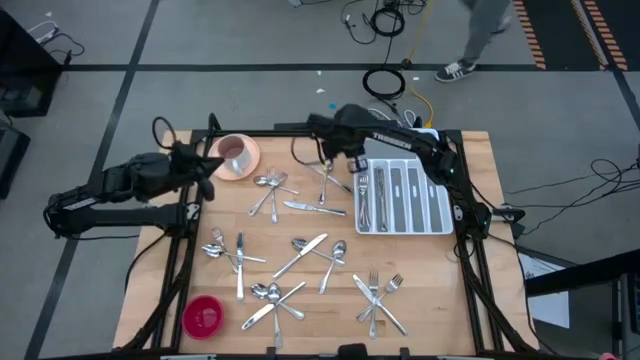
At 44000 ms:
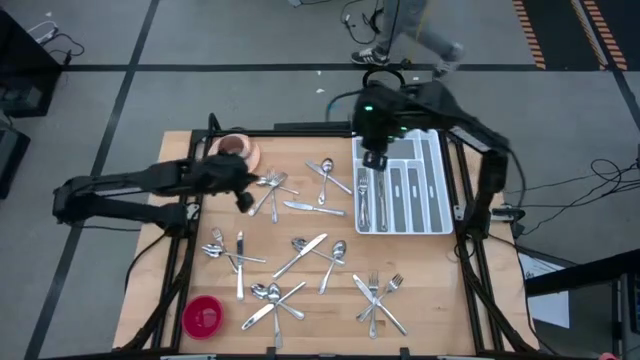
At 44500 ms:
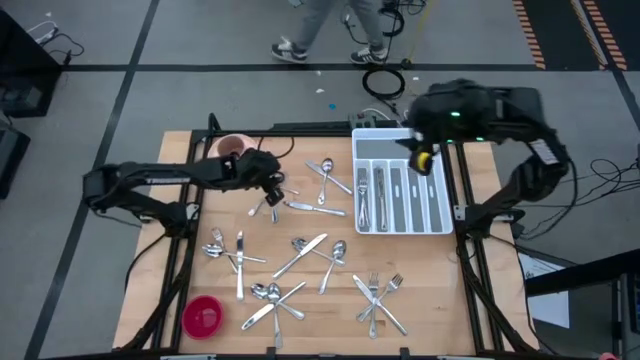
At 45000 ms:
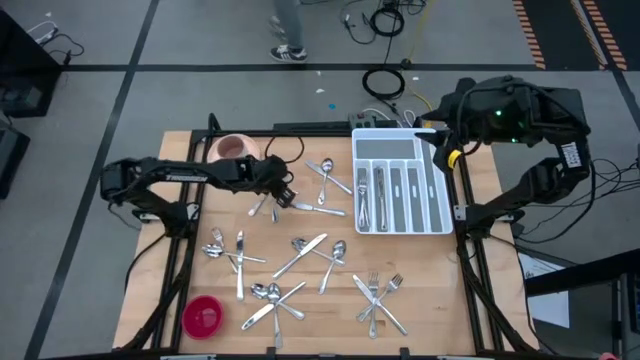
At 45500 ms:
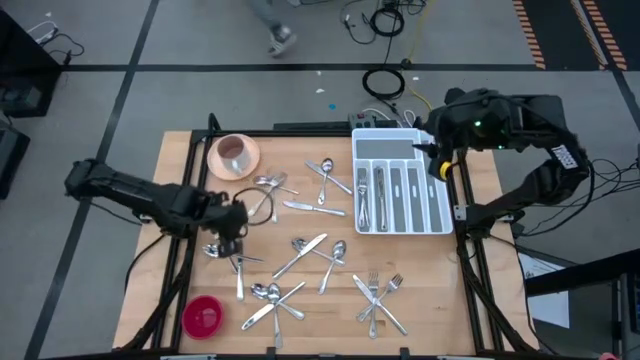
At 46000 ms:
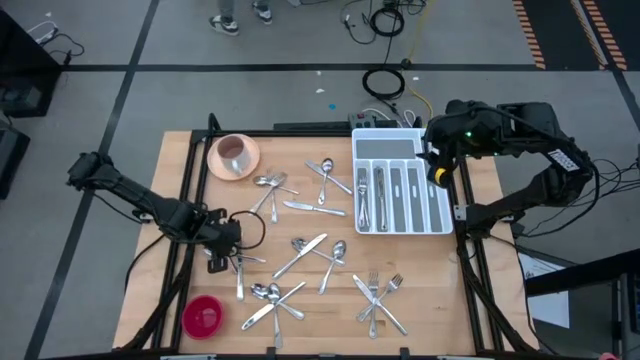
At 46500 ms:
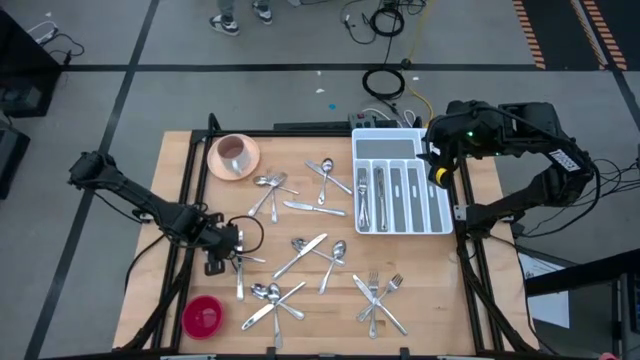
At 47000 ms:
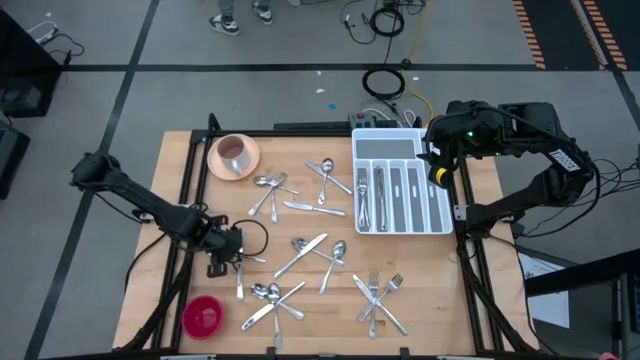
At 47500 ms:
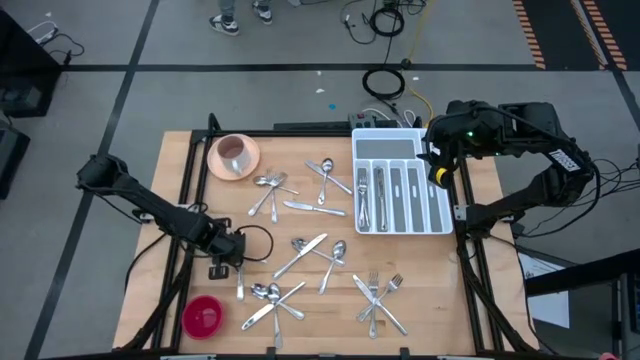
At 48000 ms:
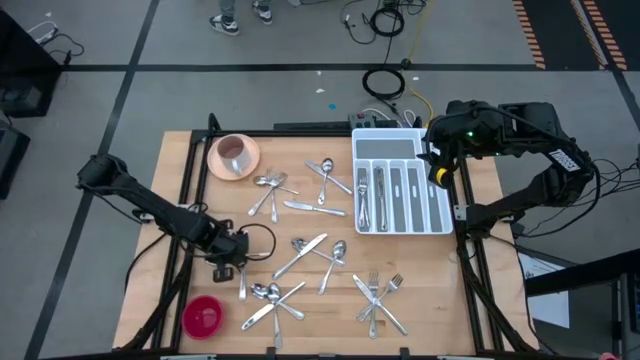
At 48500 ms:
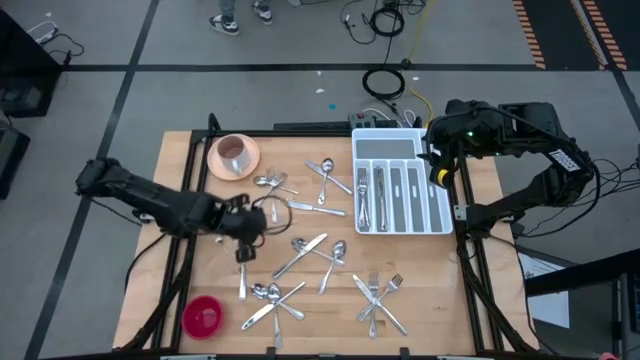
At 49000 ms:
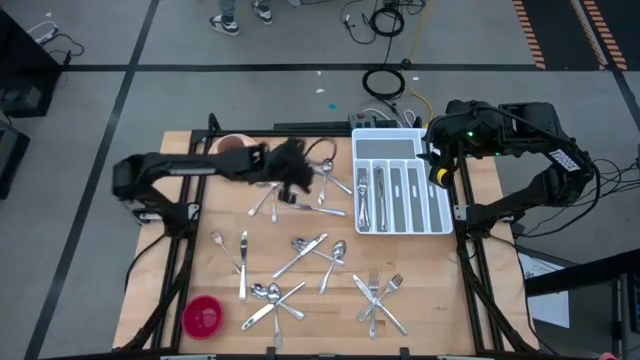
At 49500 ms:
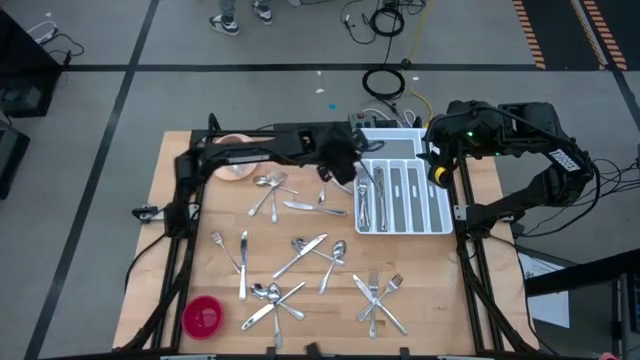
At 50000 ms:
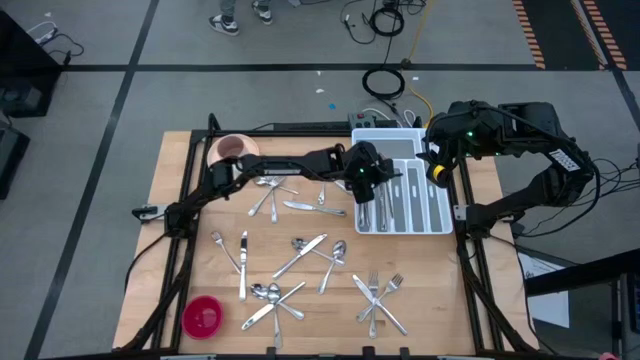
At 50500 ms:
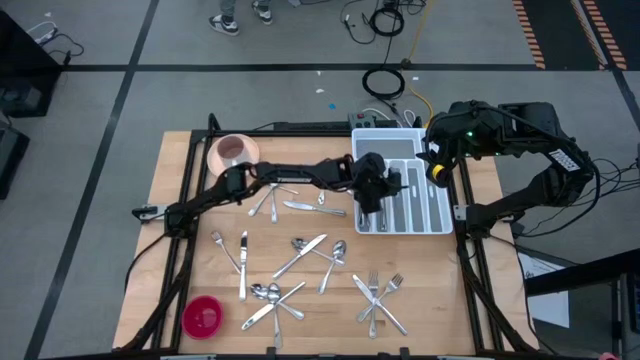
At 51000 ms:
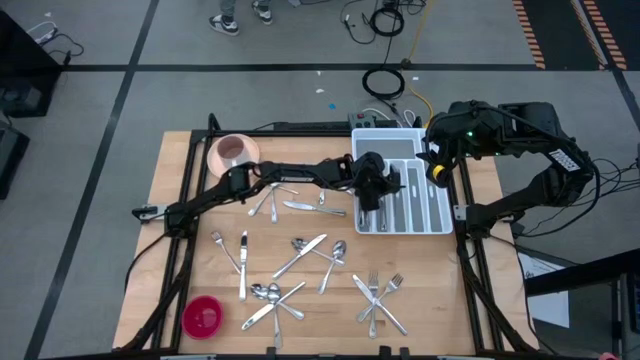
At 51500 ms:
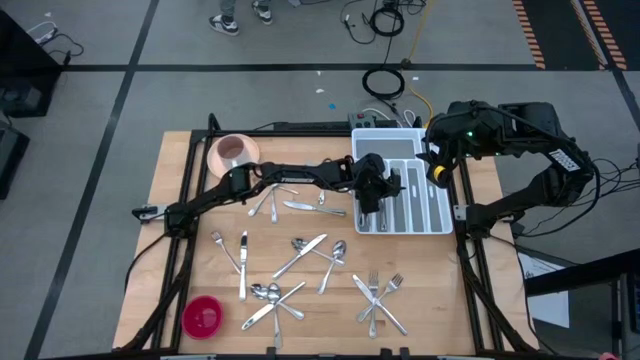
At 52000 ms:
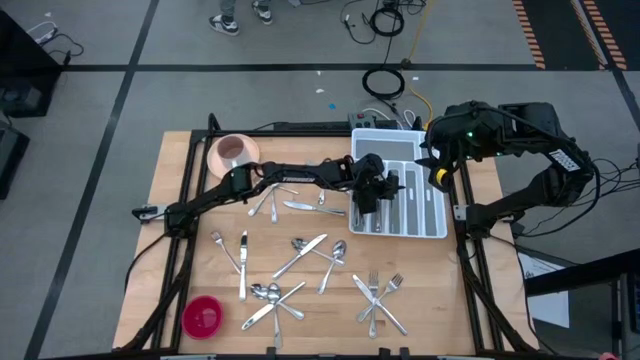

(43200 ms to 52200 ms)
Task: Sort silverware
Put the silver spoon into the white silverware tray

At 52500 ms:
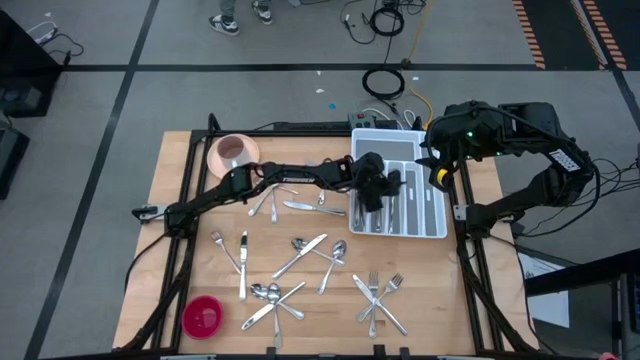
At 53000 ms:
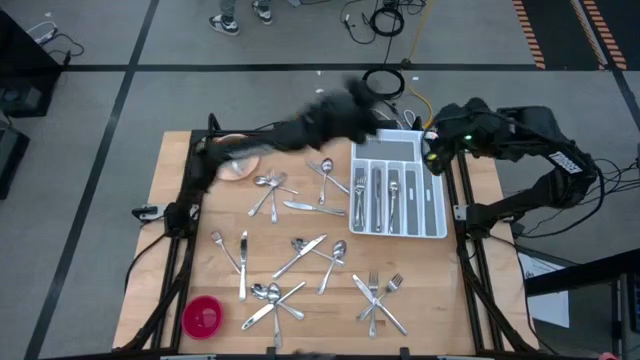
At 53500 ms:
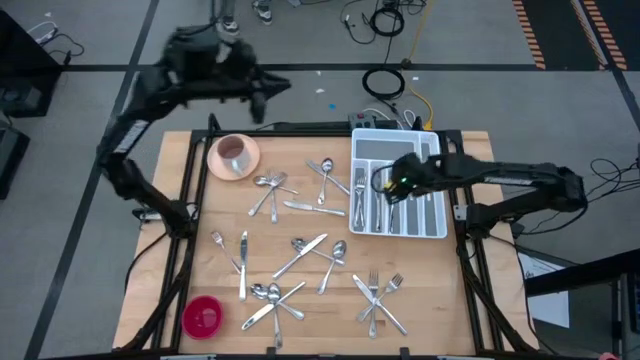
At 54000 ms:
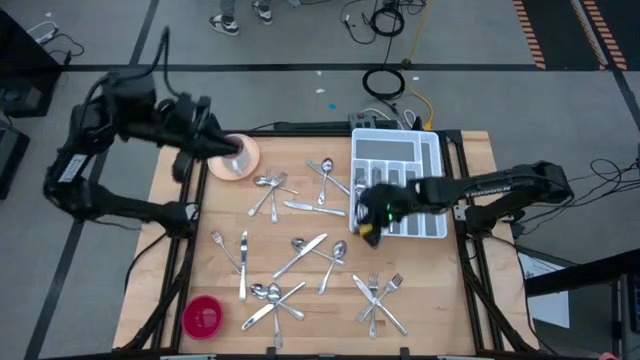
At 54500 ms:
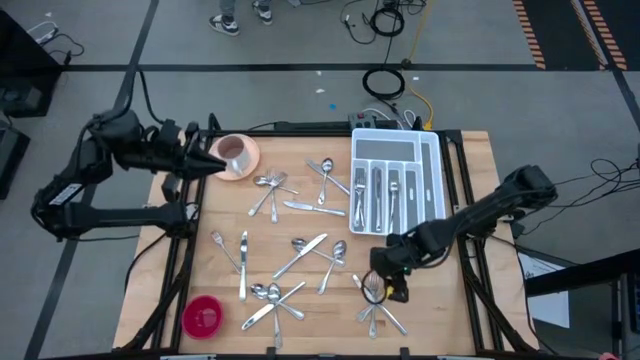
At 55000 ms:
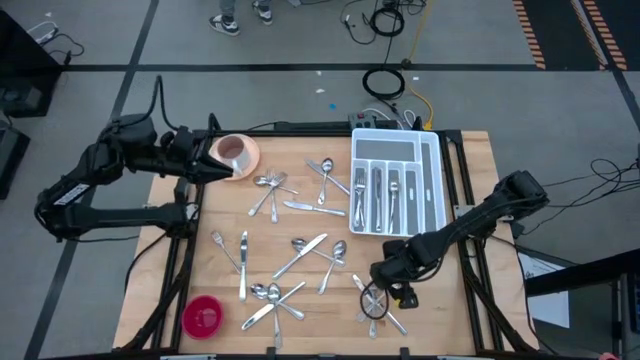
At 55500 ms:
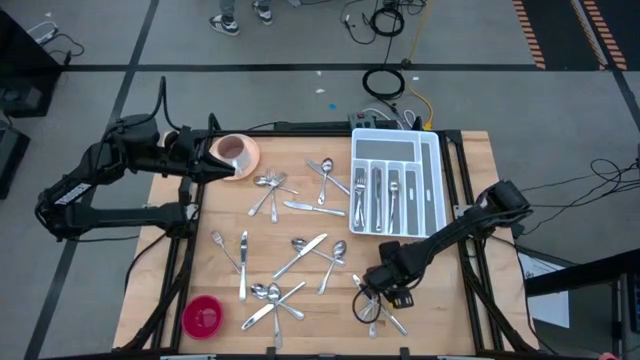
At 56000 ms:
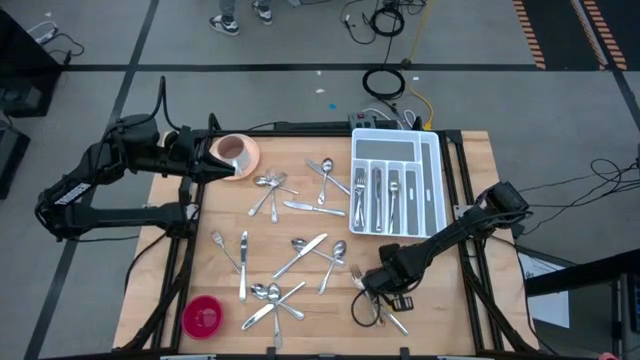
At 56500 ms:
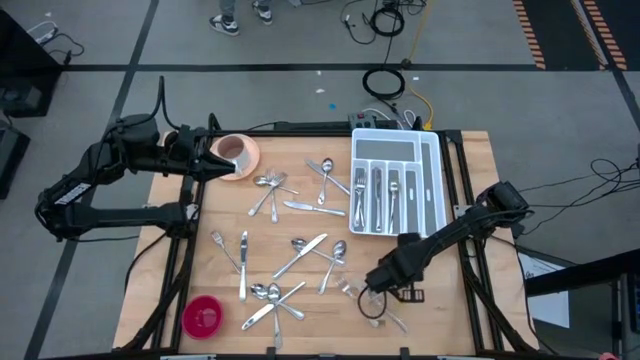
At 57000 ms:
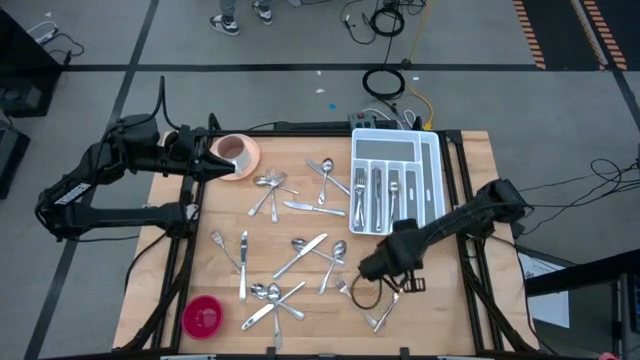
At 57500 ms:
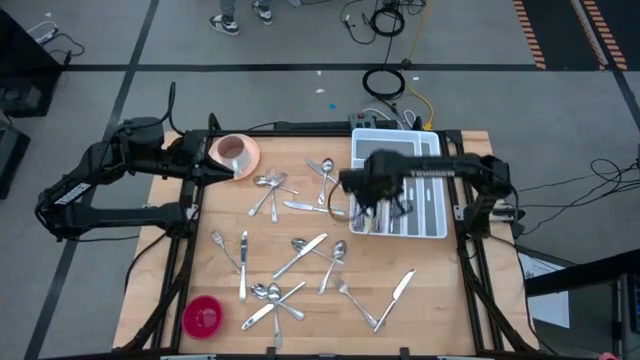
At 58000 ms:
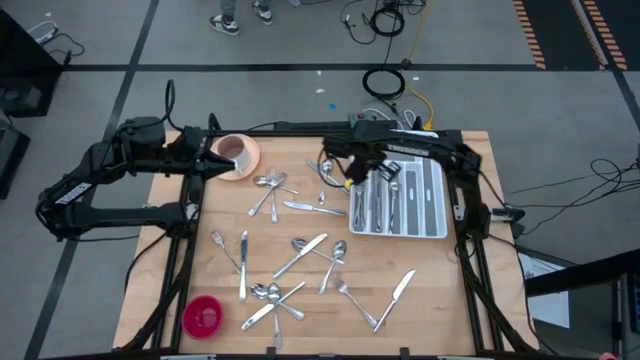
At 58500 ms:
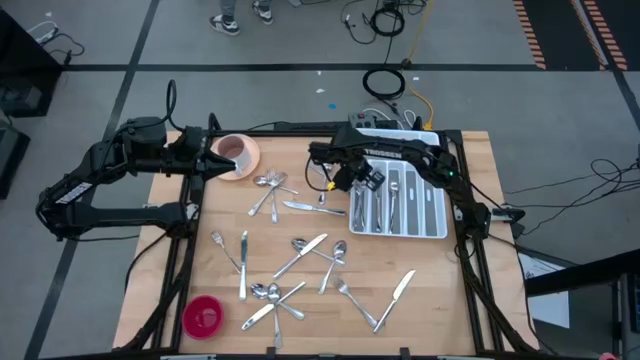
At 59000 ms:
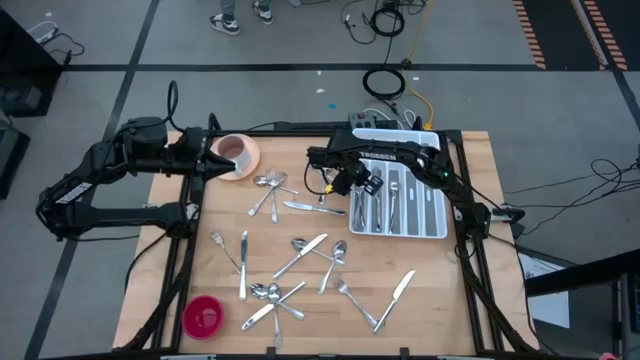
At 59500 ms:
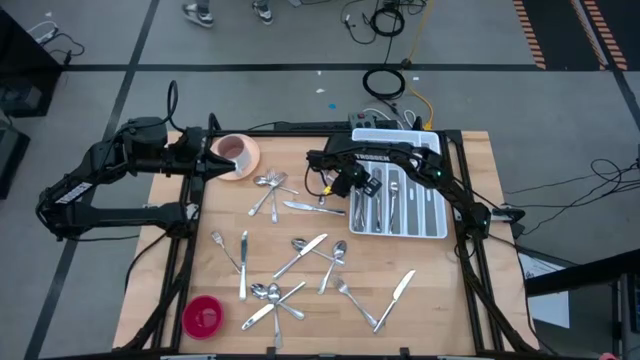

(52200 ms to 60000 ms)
Put the silver fork into the white silverware tray

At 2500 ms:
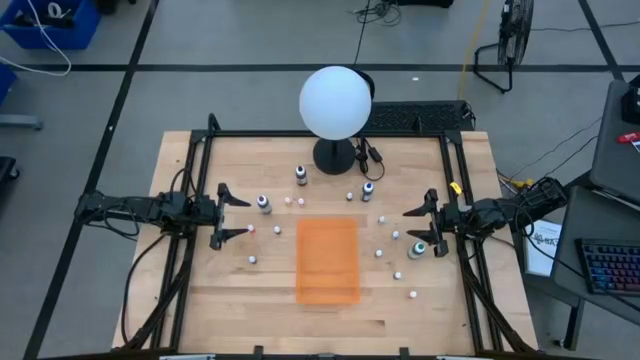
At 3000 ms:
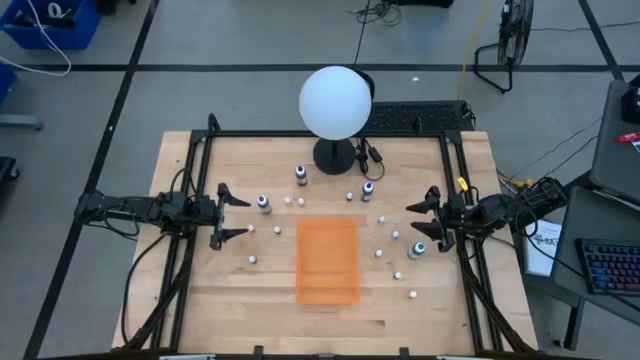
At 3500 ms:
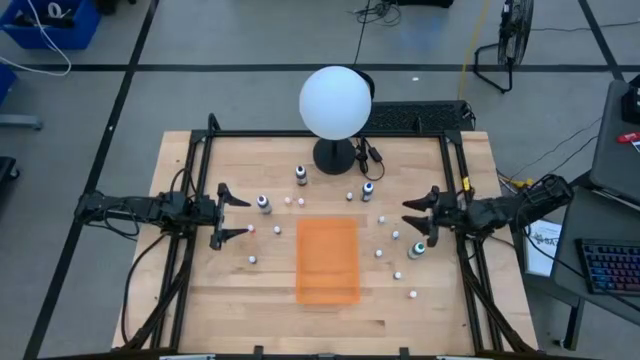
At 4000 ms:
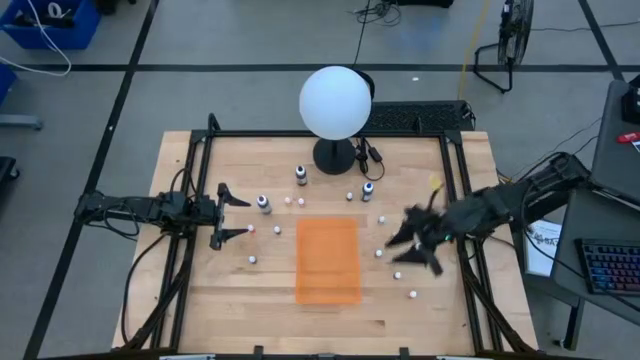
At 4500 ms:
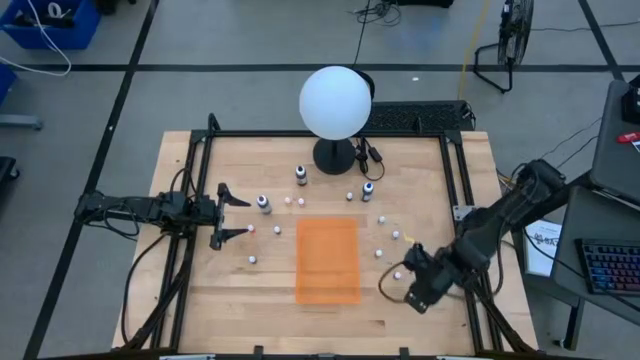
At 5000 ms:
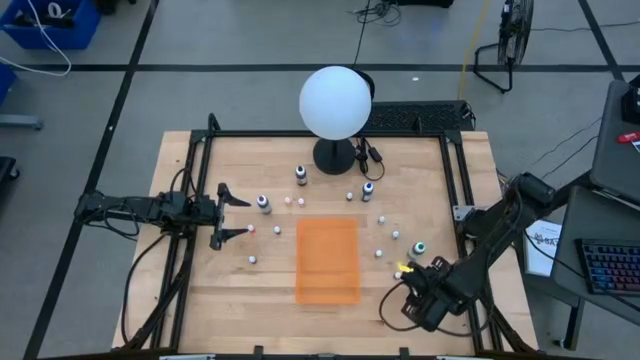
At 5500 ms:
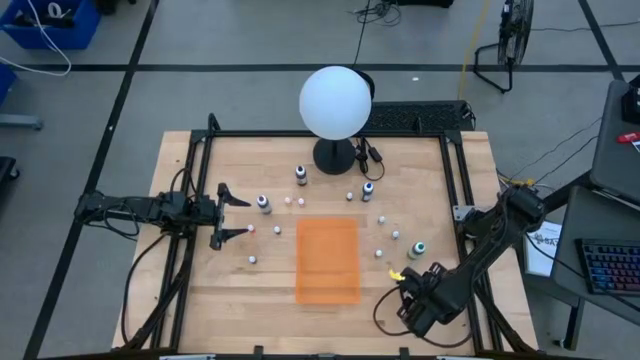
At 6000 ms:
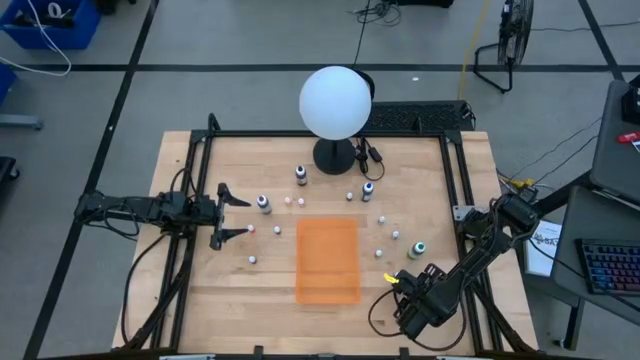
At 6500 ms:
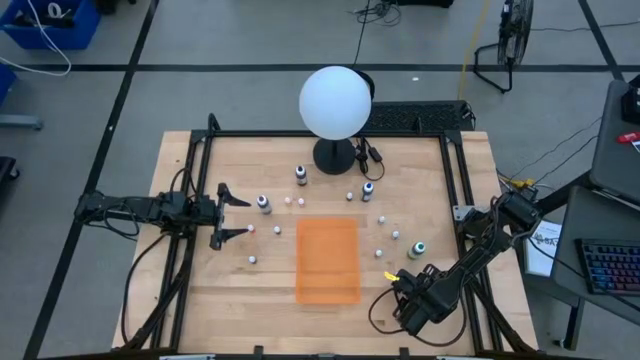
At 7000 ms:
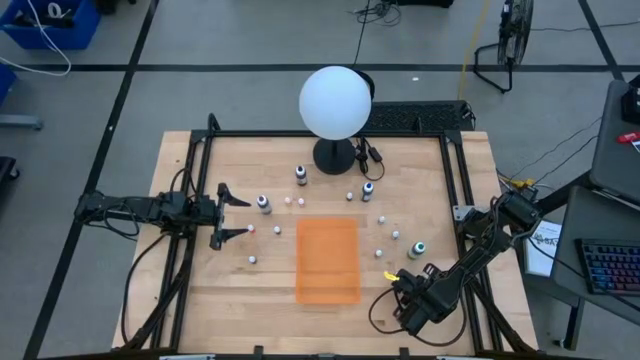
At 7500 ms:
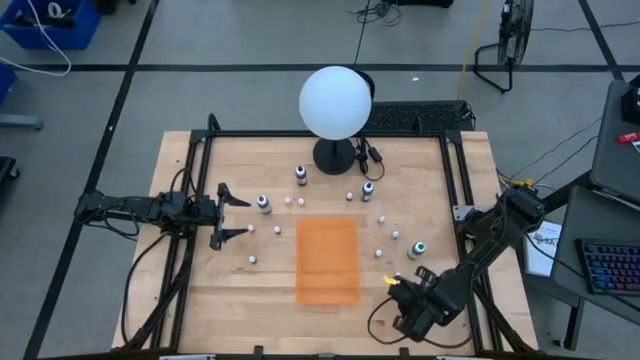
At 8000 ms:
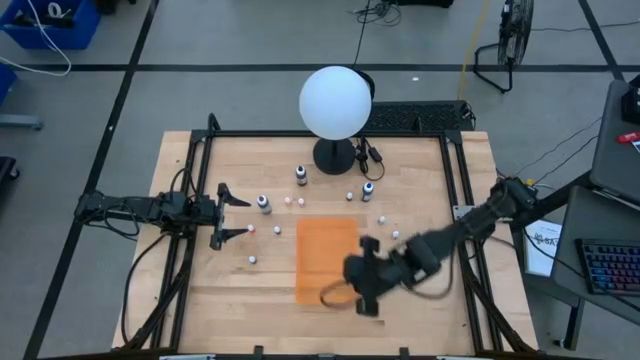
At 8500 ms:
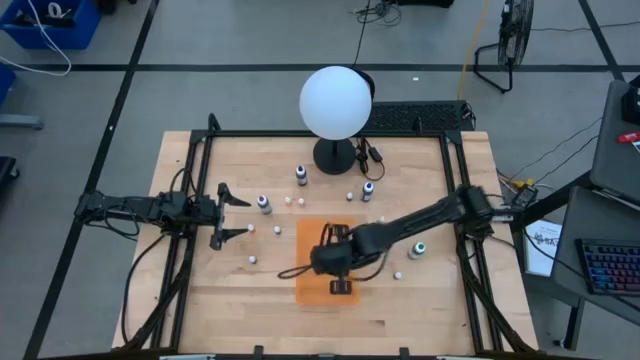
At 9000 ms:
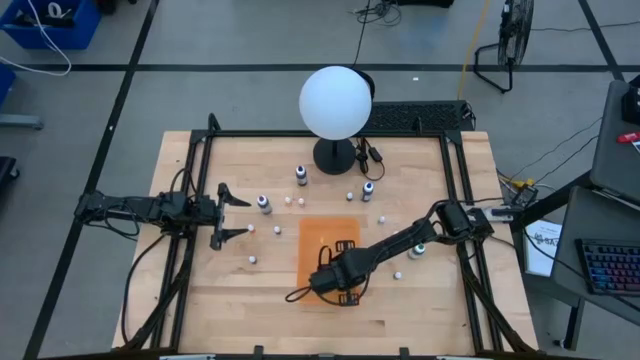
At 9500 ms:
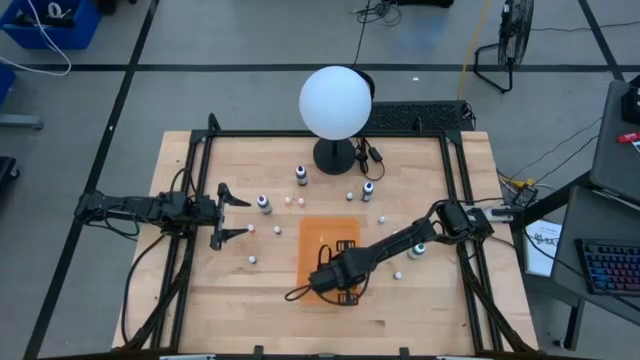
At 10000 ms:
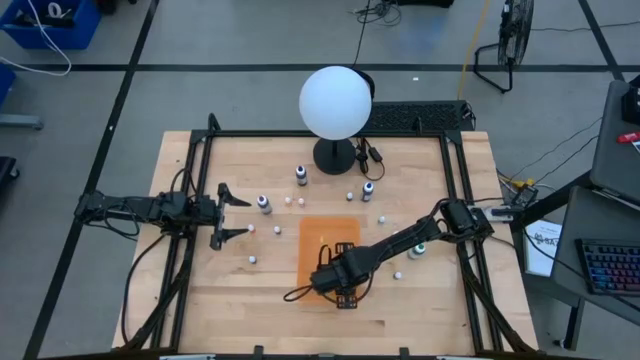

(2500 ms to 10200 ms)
Task: Pick & Place food coloring
Put the small orange food coloring bottle into the orange bin
